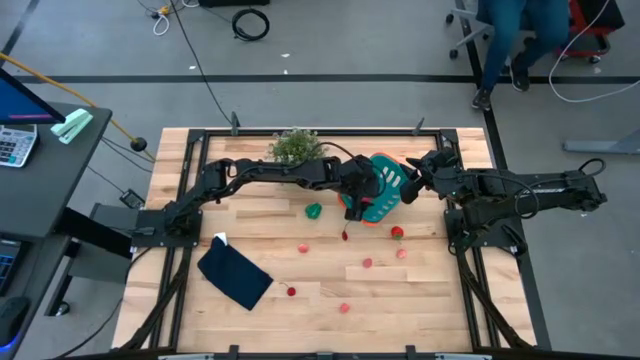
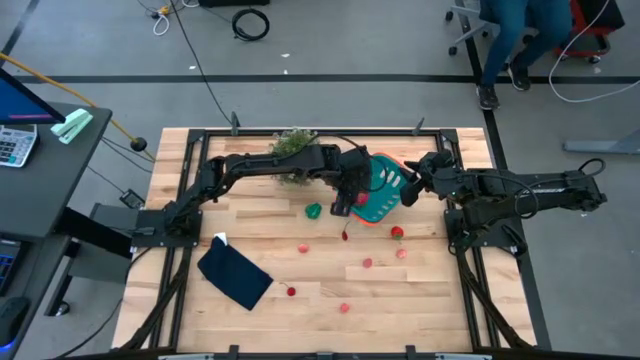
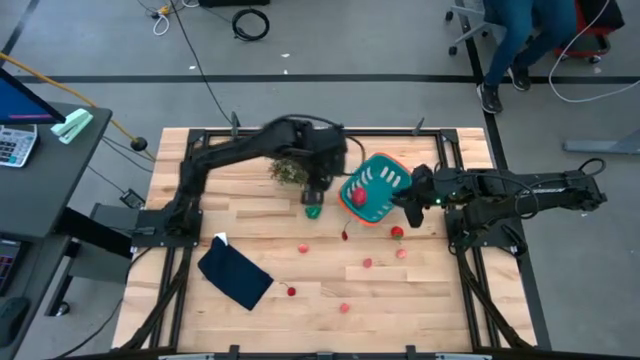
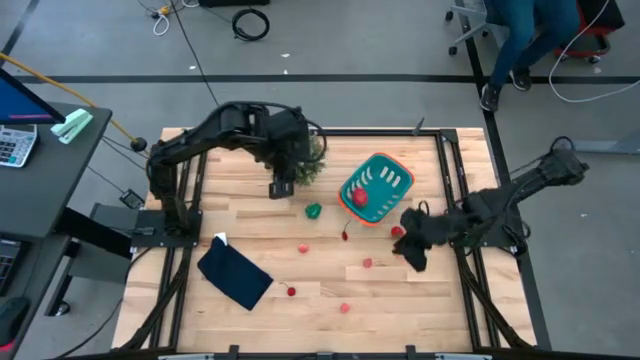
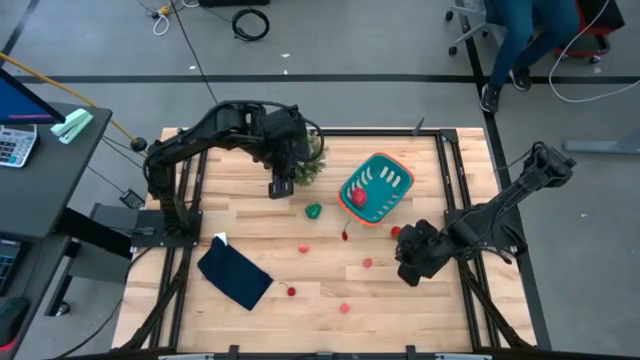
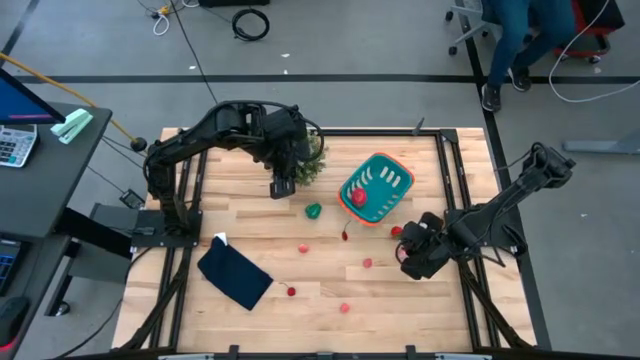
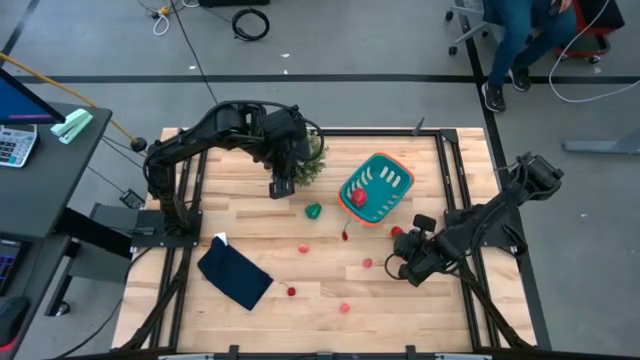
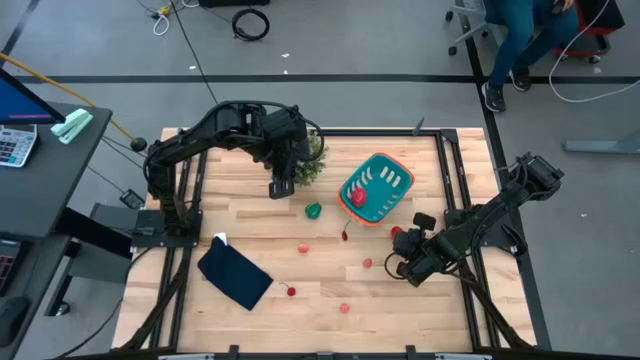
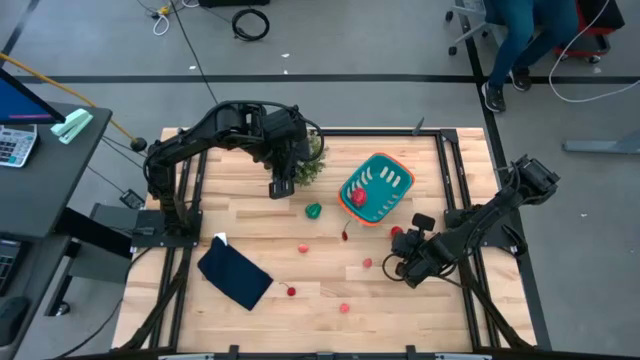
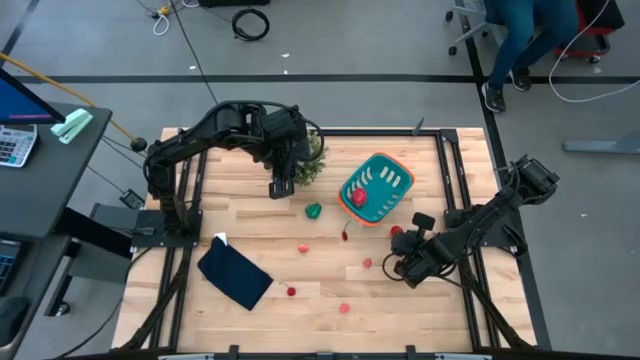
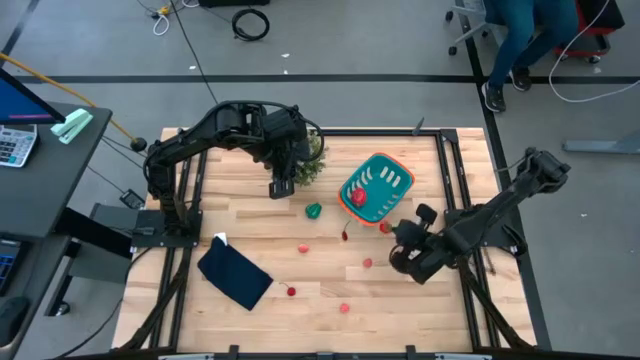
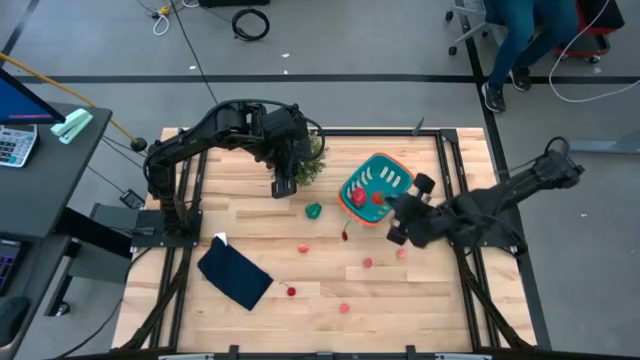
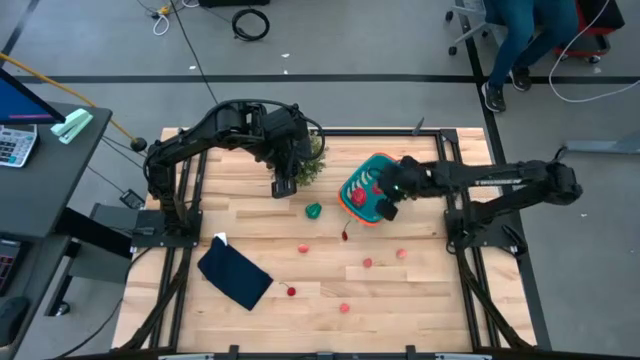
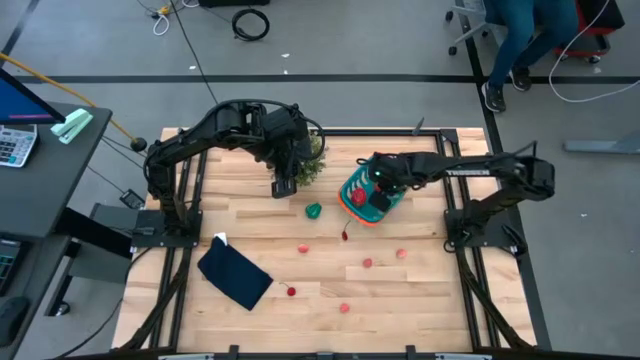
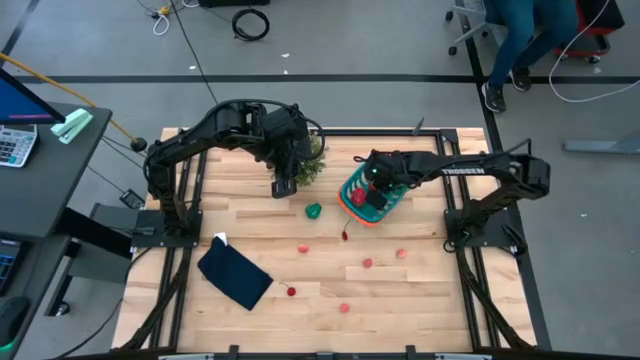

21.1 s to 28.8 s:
Task: Pick and placing Produce into tupperware
Put the red strawberry into the basket

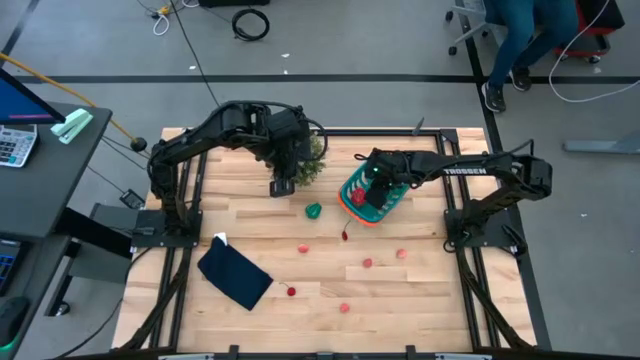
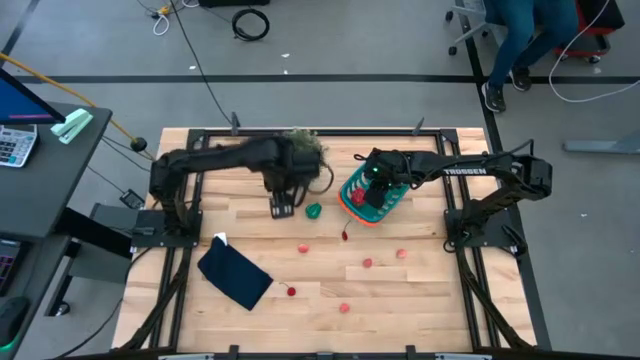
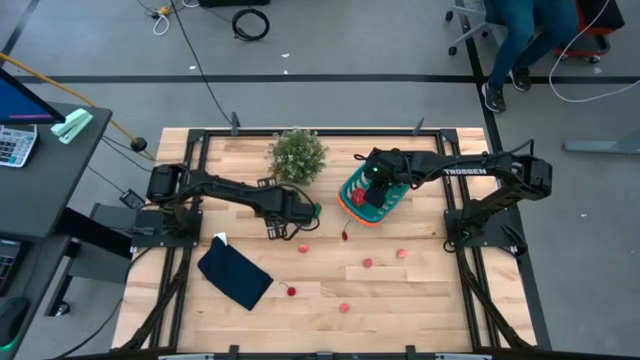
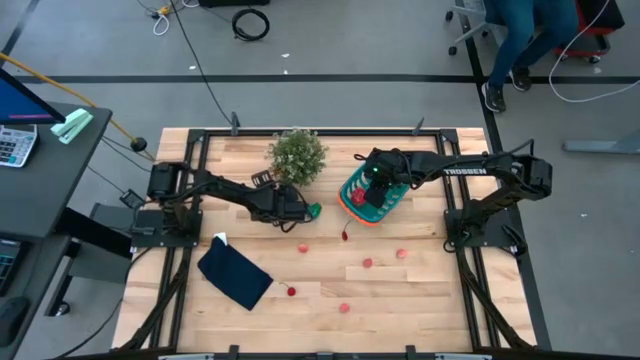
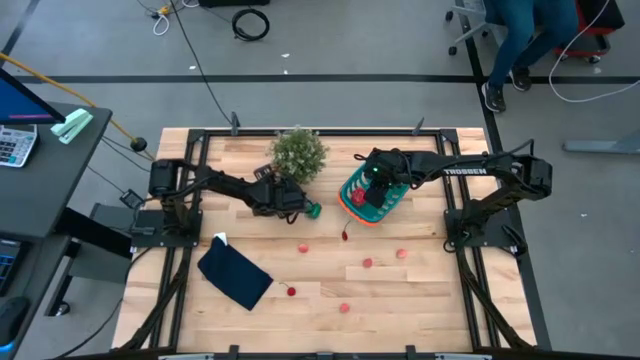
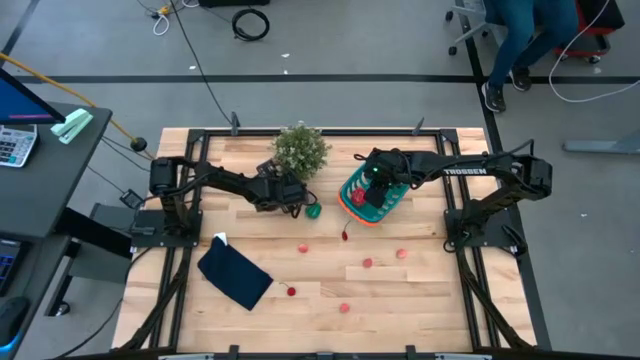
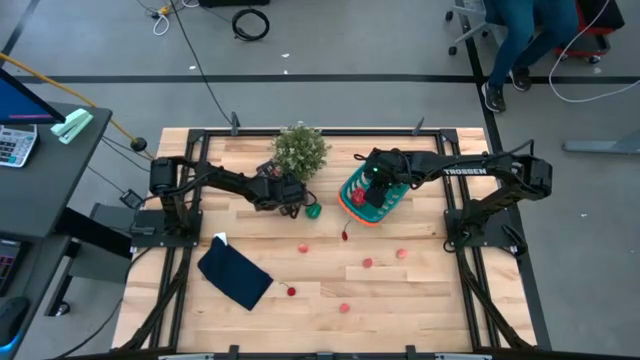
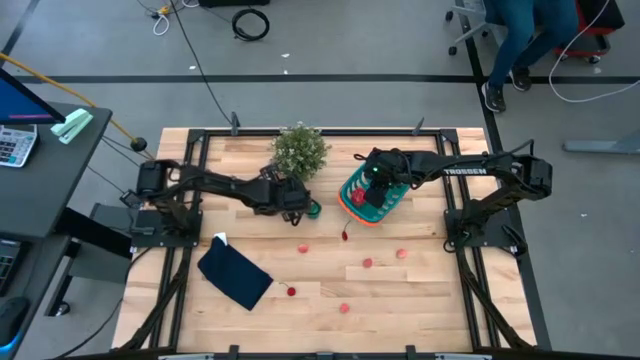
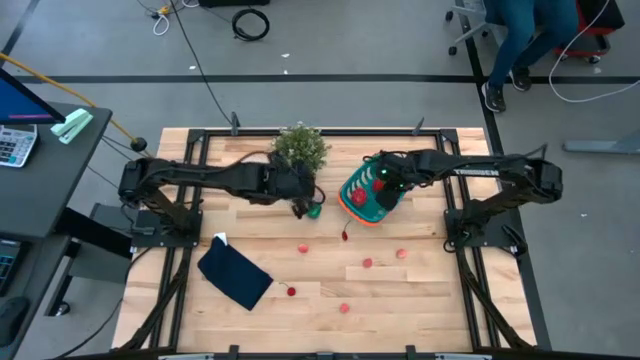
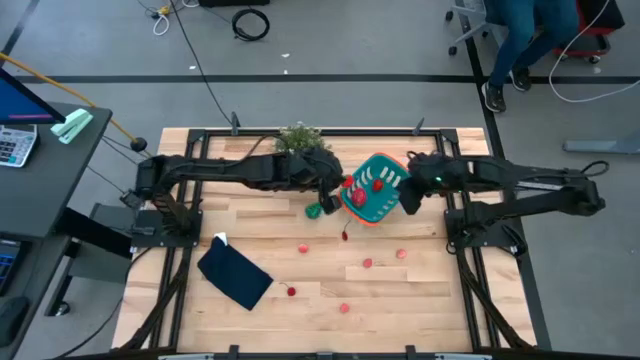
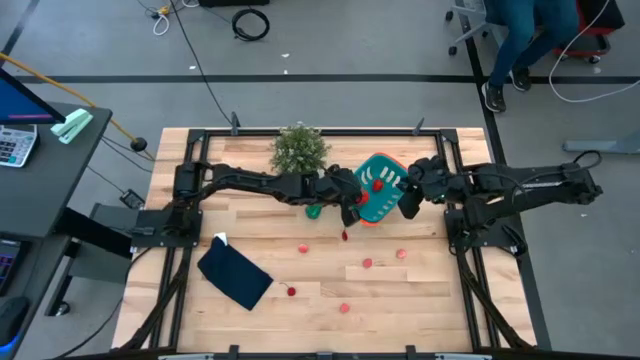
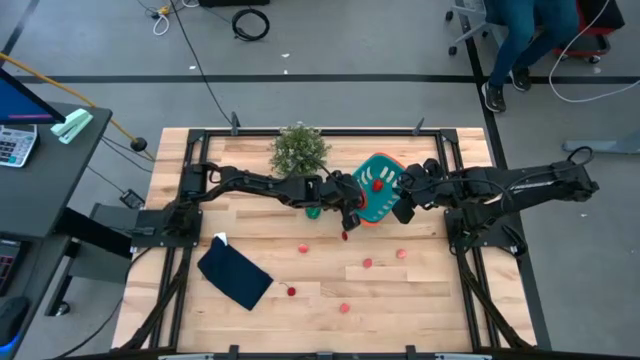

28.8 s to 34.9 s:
Put the red strawberry into the basket

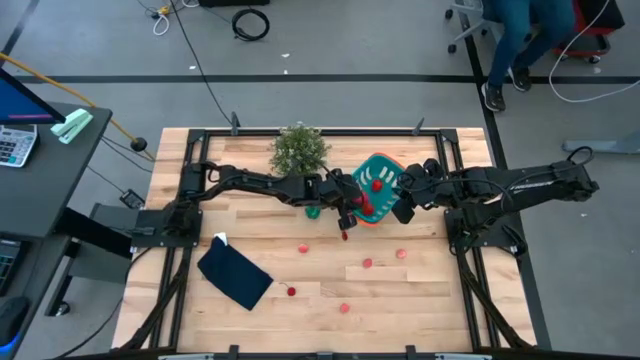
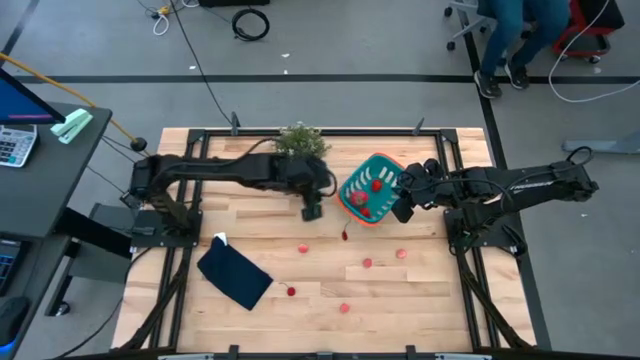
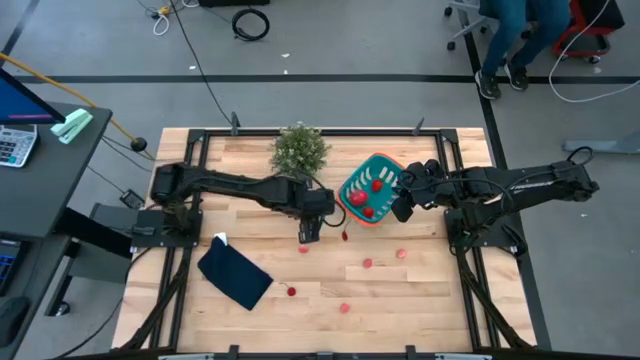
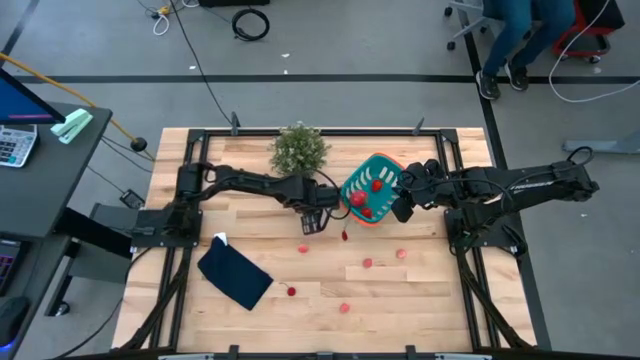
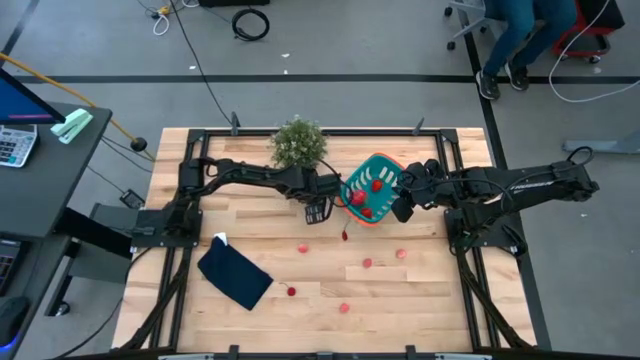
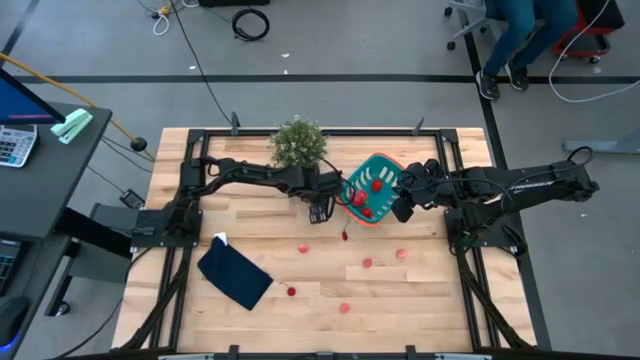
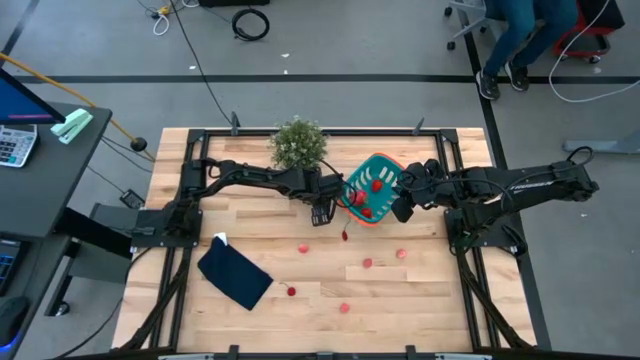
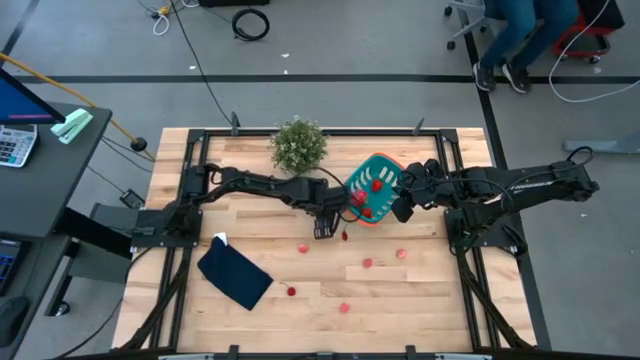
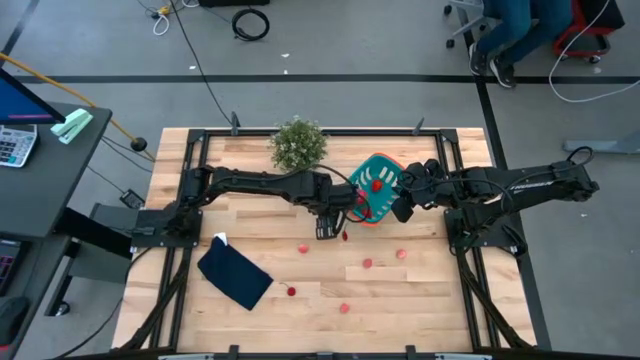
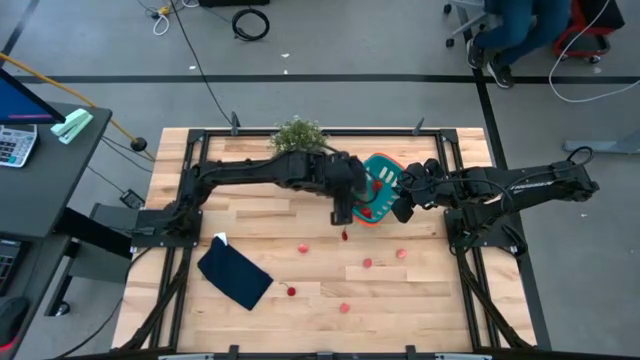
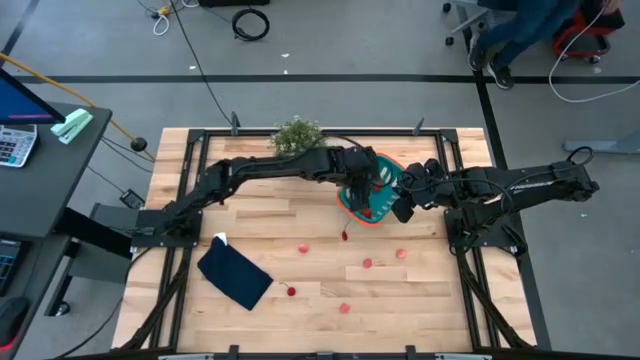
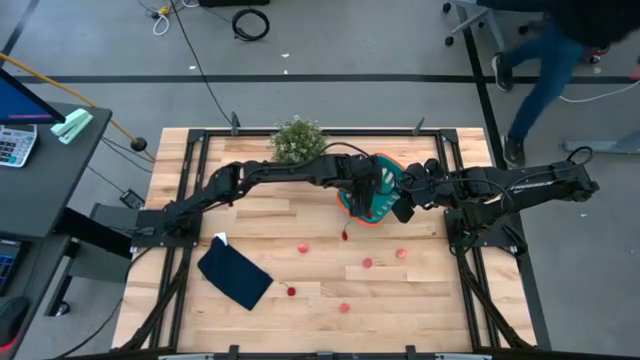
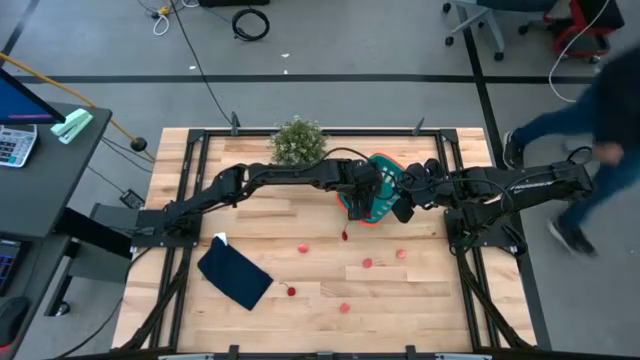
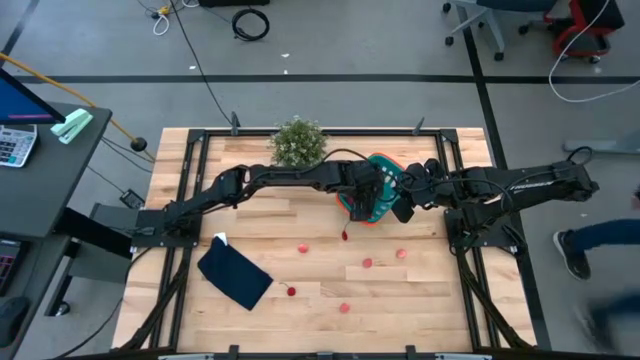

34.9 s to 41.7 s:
Put the green bell pepper into the basket
